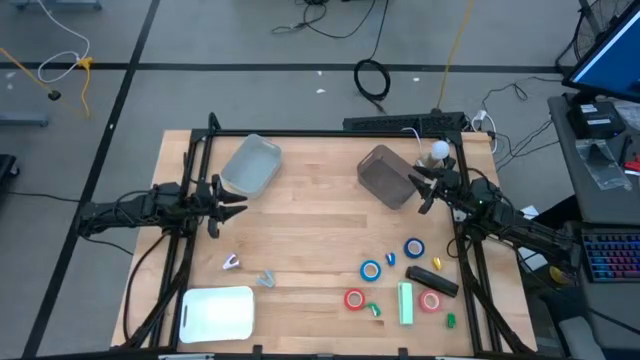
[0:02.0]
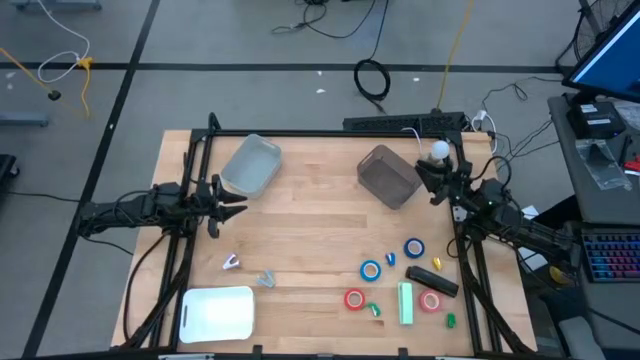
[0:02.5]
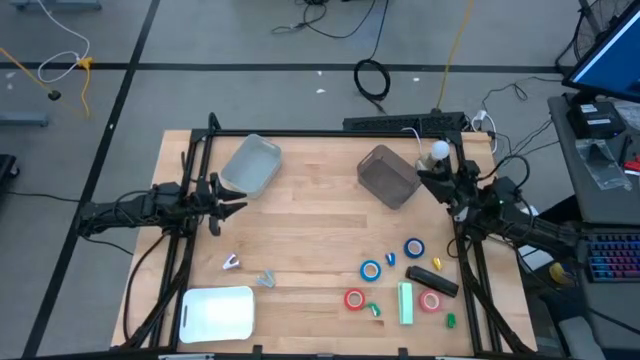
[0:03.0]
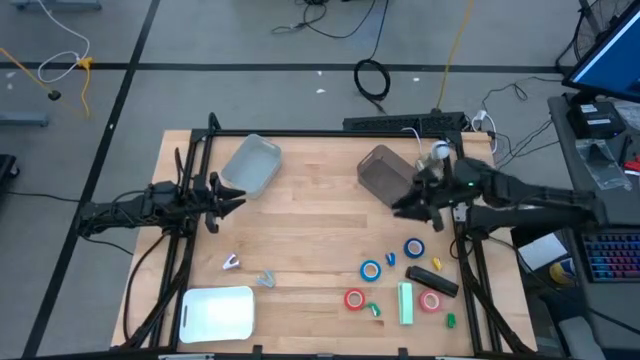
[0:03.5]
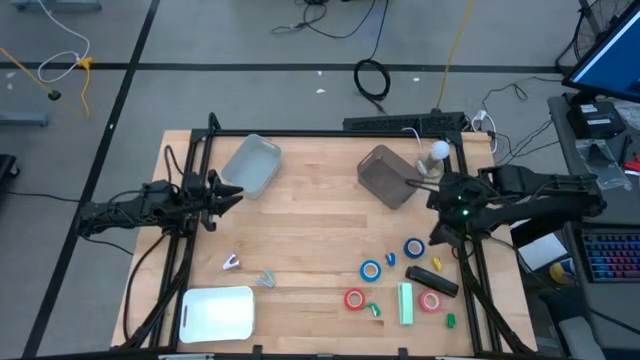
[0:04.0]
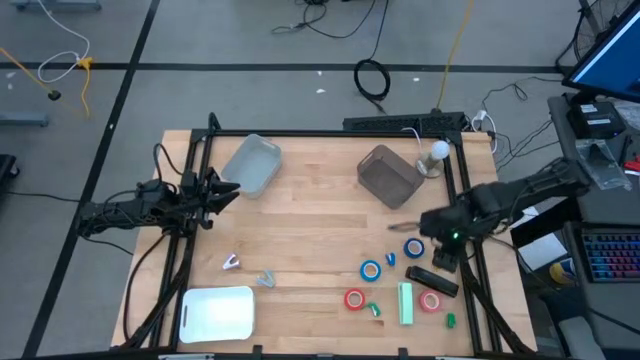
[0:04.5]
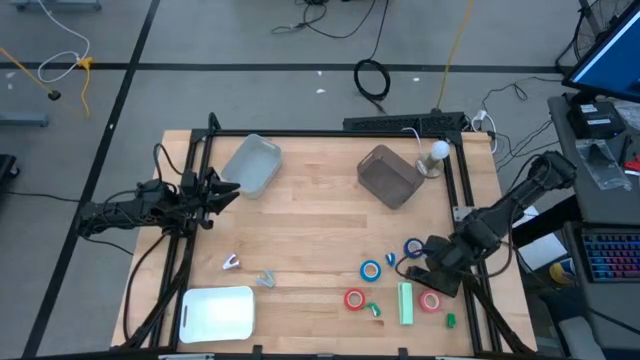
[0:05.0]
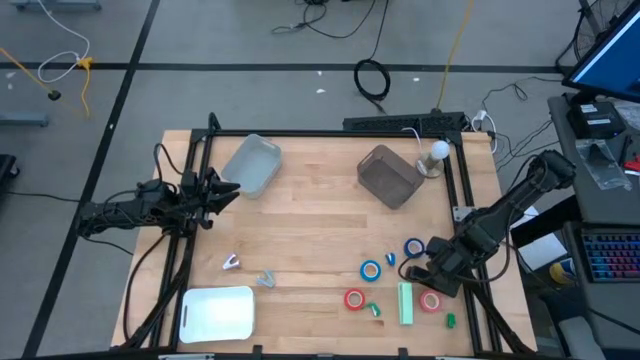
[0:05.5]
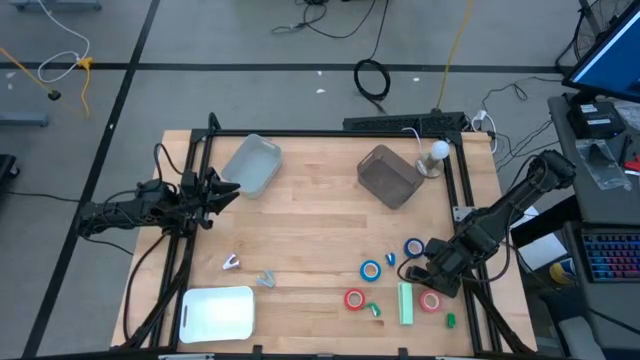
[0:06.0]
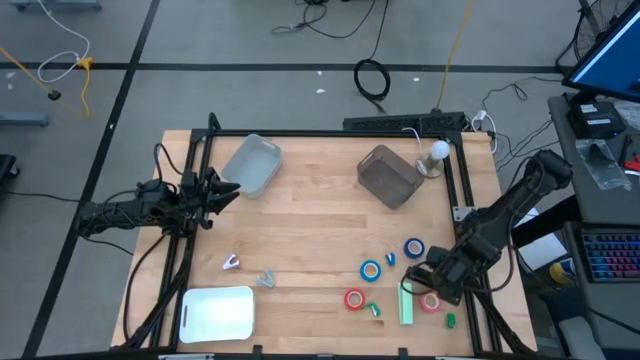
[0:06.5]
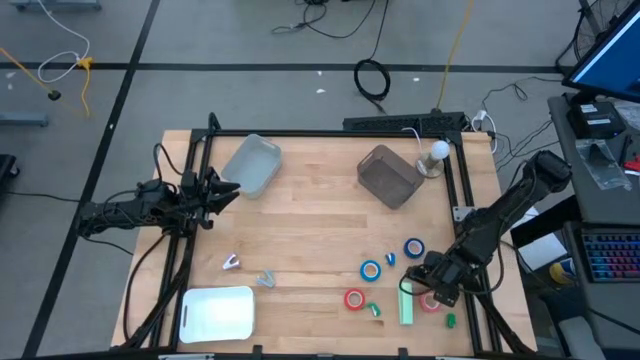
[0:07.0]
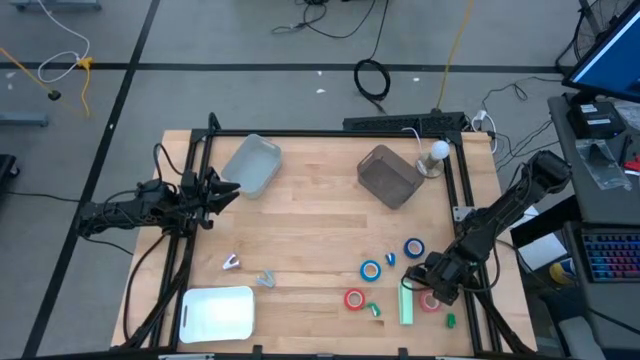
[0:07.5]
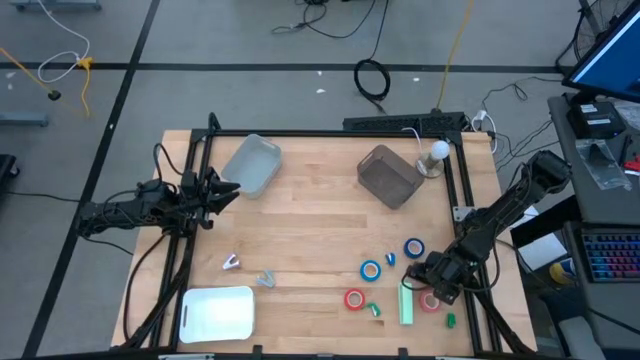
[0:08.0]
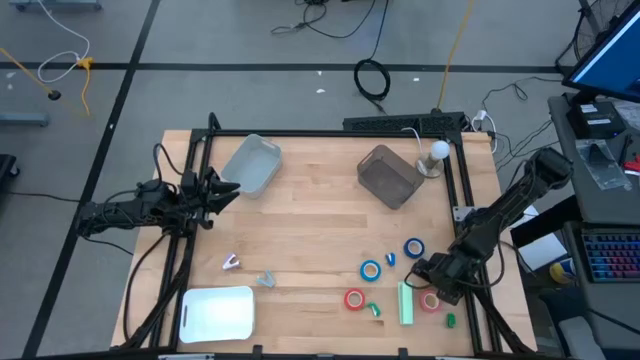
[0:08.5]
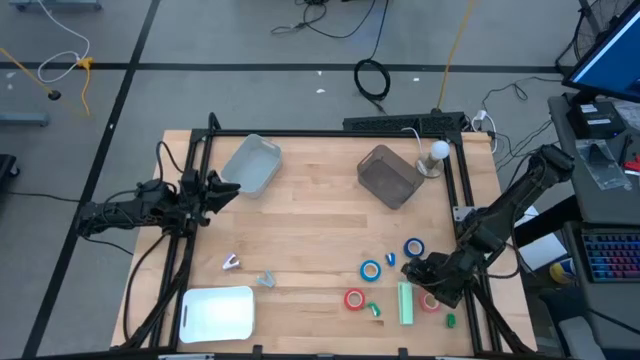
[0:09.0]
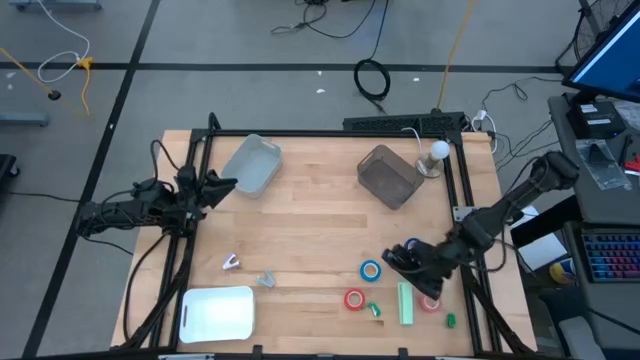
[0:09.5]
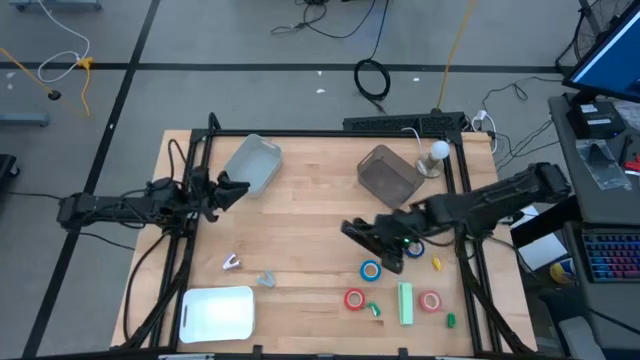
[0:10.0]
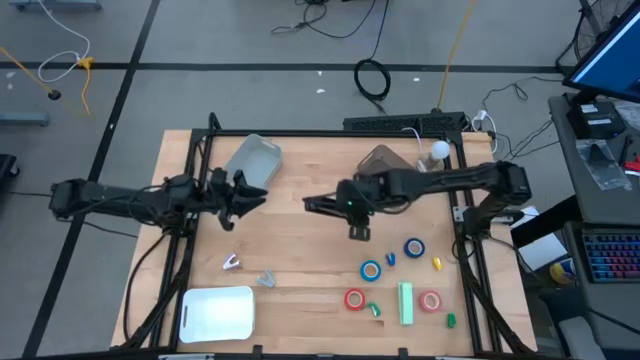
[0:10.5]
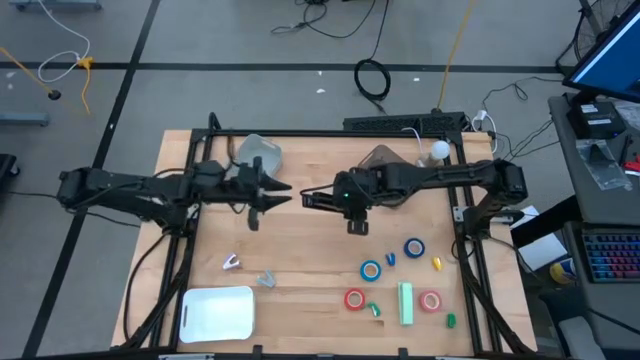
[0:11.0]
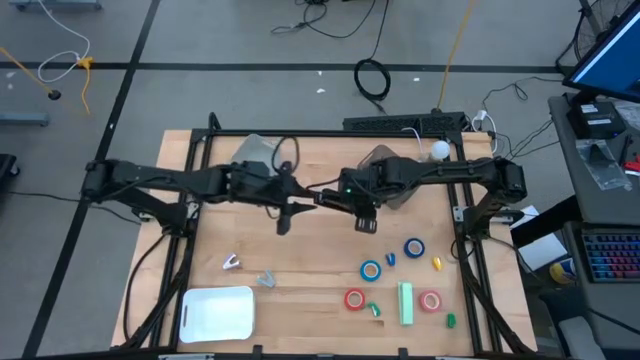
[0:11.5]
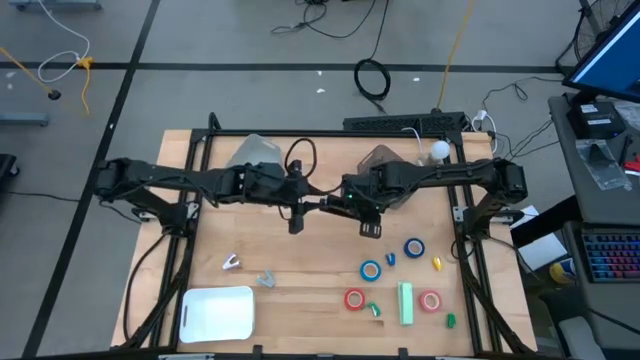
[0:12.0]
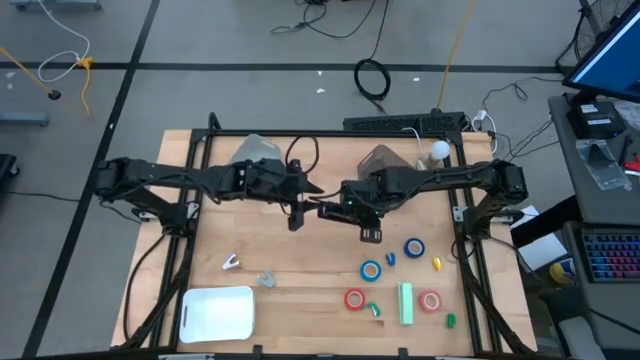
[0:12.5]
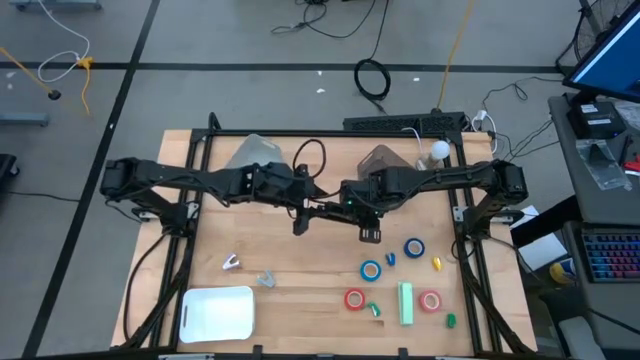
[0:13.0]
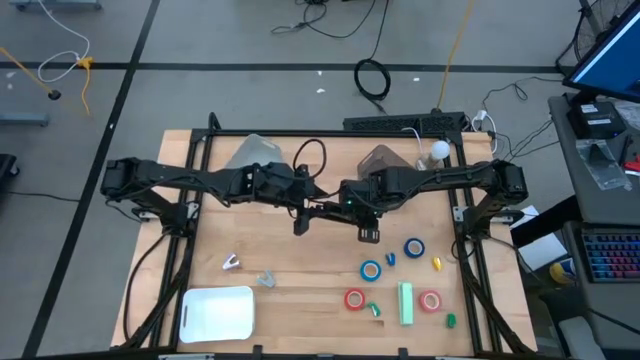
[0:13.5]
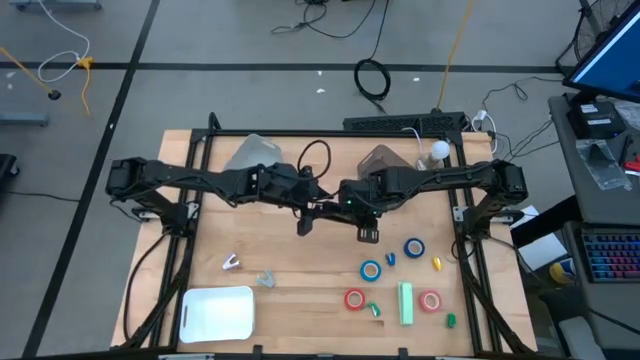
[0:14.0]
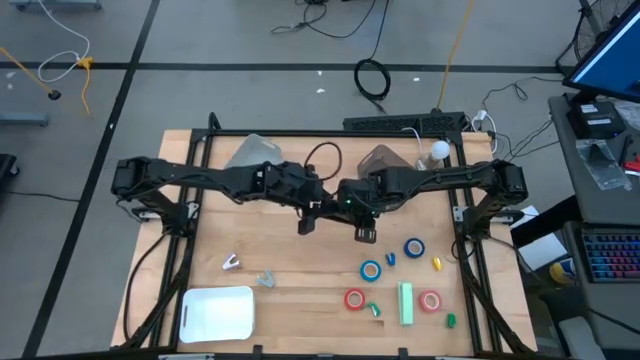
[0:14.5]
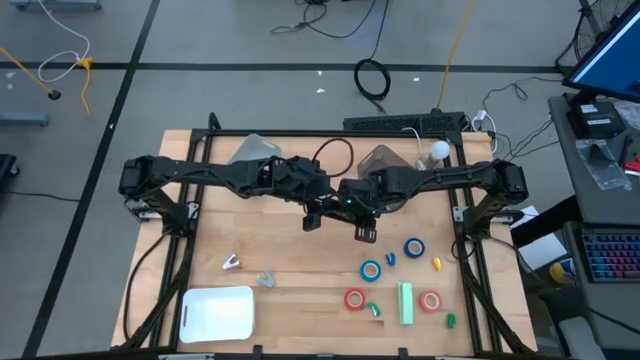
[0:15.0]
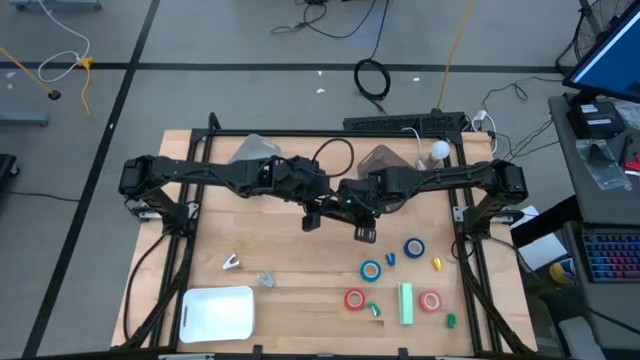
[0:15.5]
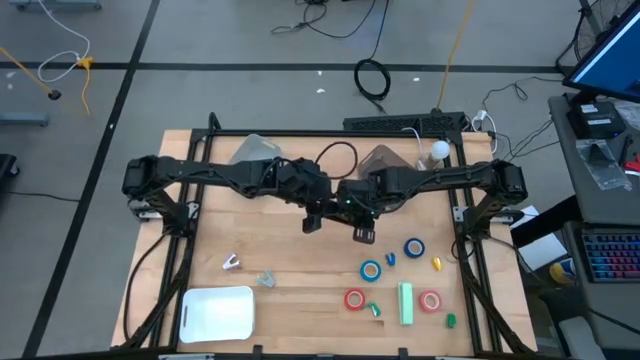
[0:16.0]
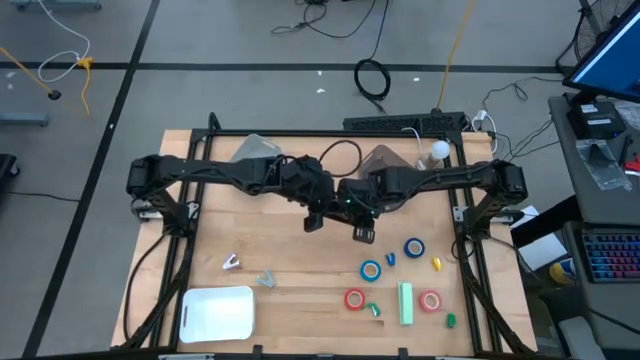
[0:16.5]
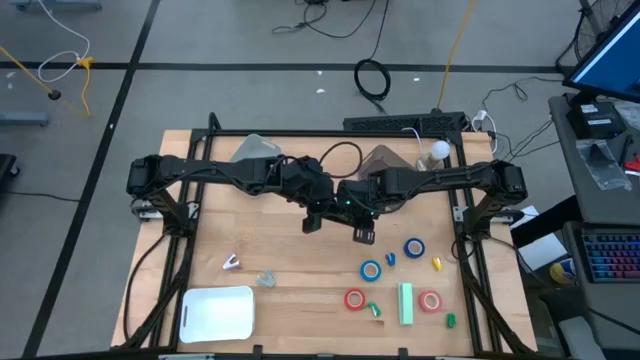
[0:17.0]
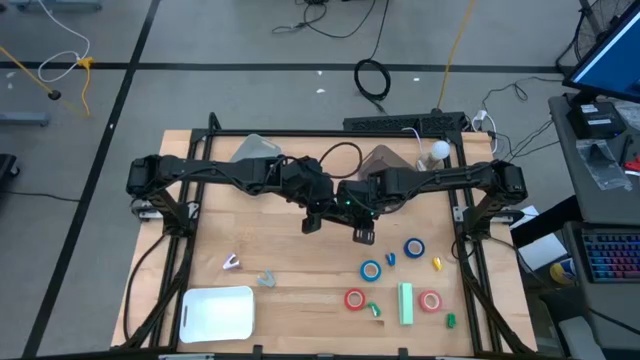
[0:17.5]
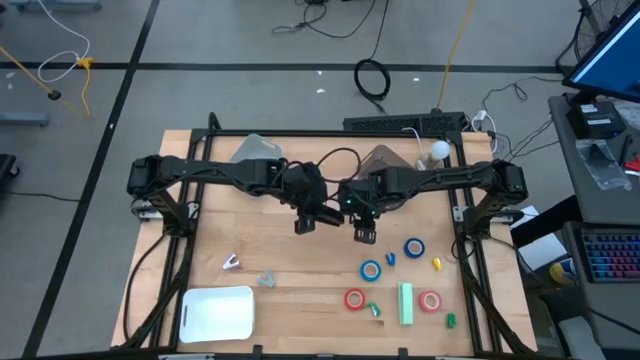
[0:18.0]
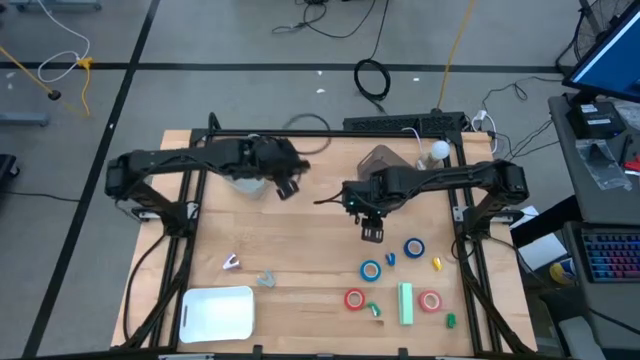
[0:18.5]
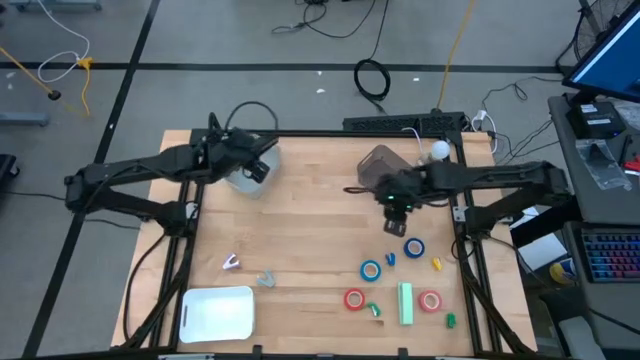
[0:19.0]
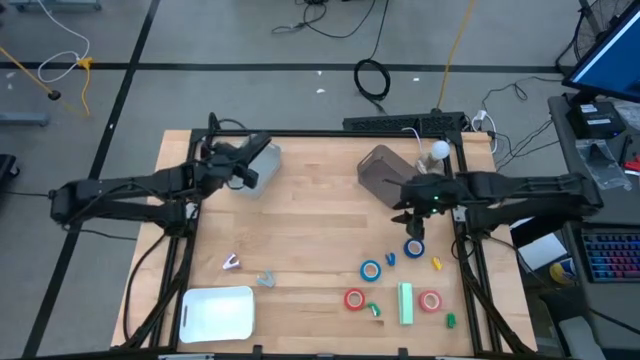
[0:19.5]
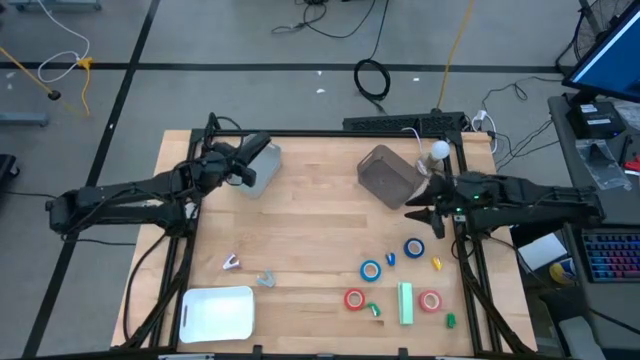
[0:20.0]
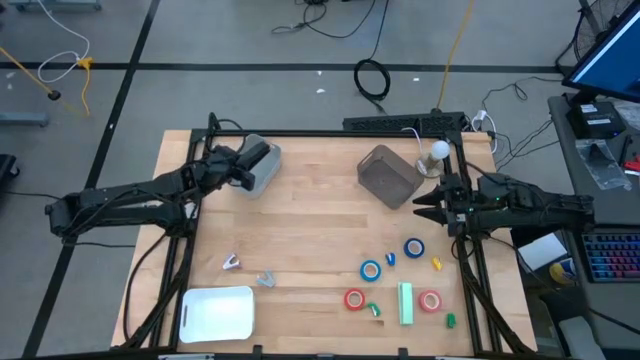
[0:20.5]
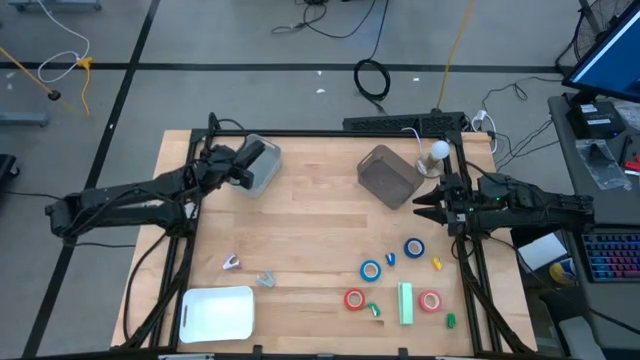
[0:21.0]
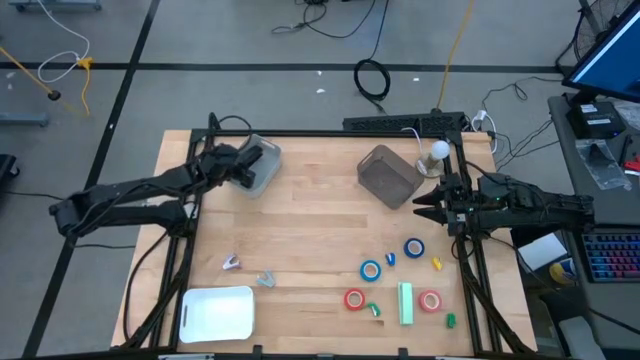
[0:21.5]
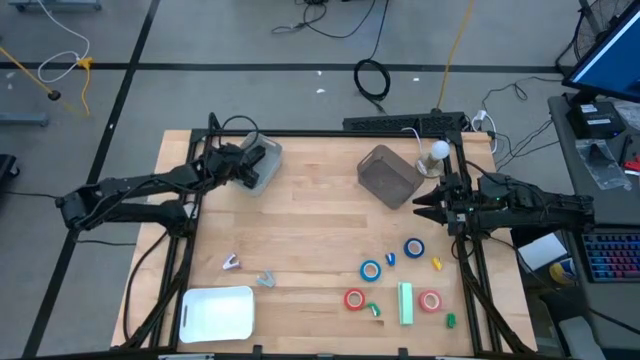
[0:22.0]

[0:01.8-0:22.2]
Task: Pick and place Stapler, Stapler remover, tape
Put the black stapler into the gray bin
